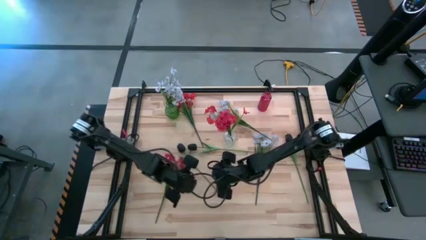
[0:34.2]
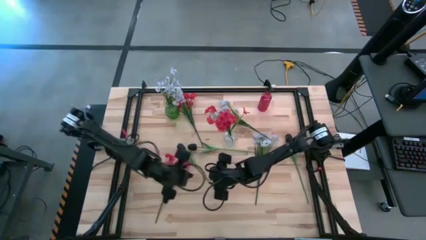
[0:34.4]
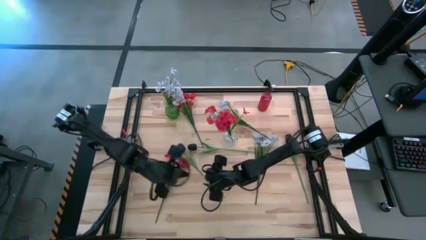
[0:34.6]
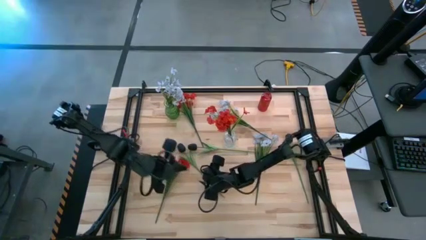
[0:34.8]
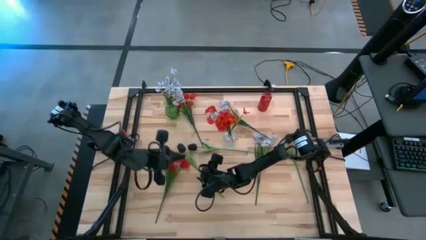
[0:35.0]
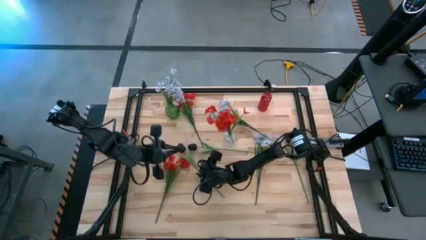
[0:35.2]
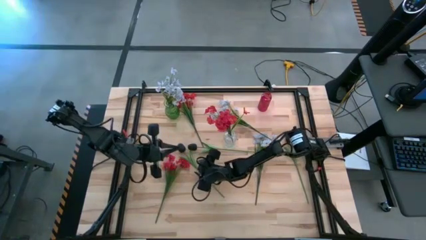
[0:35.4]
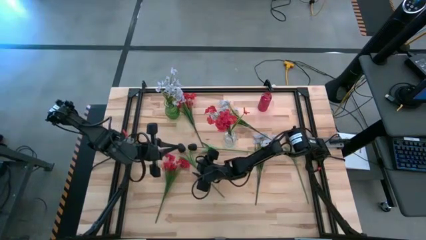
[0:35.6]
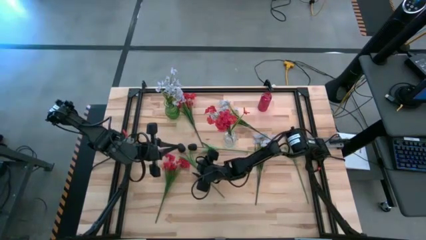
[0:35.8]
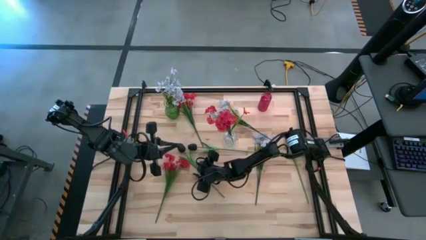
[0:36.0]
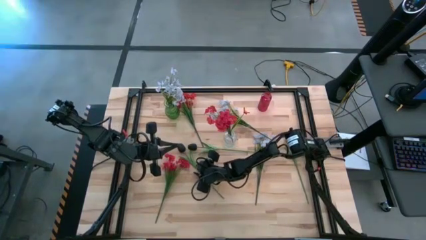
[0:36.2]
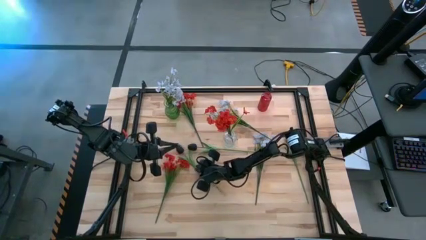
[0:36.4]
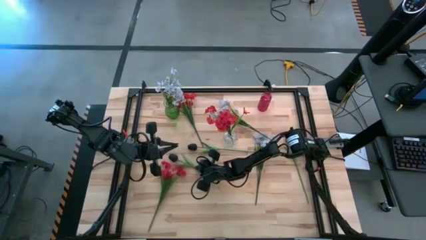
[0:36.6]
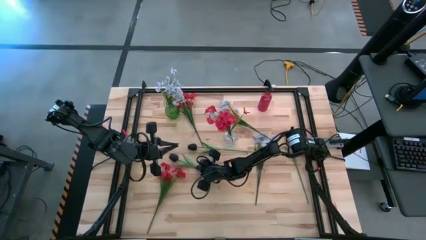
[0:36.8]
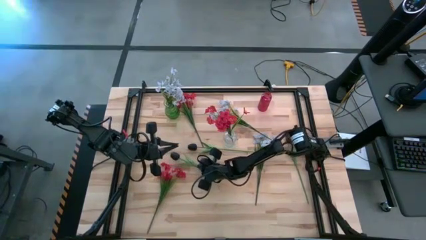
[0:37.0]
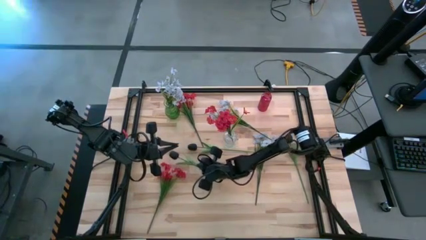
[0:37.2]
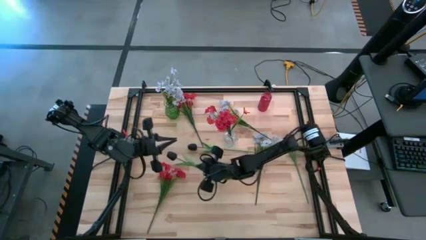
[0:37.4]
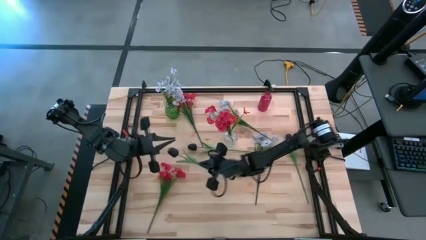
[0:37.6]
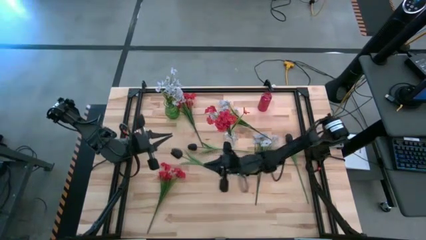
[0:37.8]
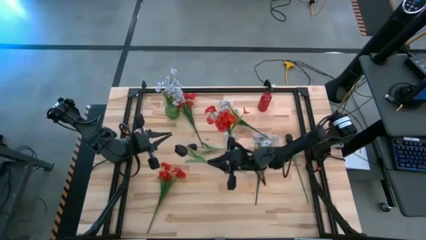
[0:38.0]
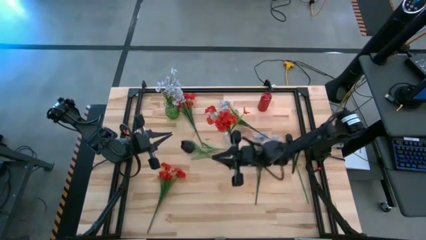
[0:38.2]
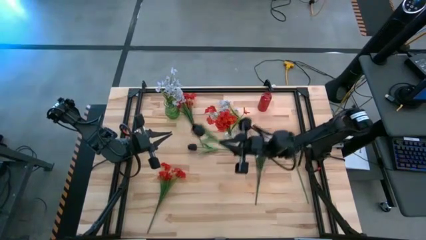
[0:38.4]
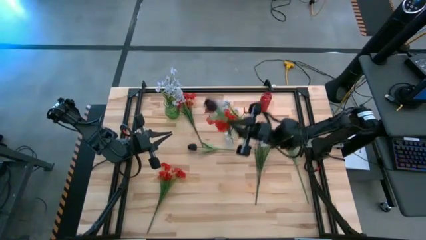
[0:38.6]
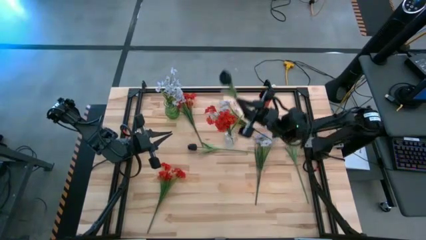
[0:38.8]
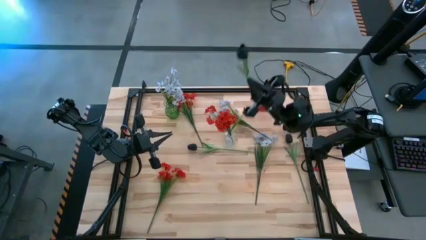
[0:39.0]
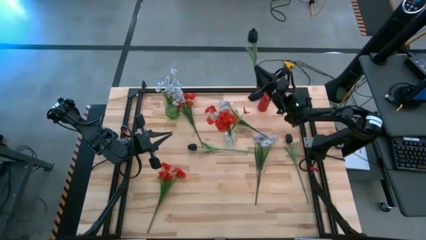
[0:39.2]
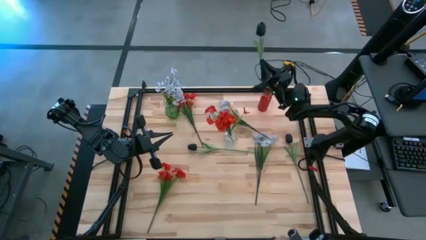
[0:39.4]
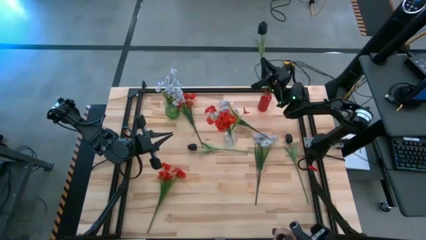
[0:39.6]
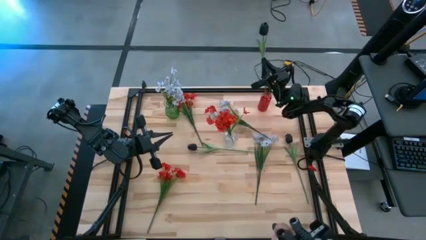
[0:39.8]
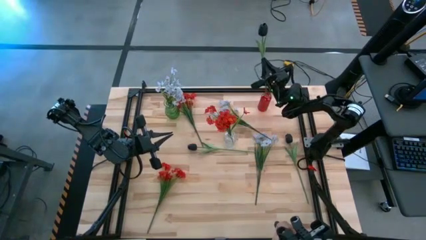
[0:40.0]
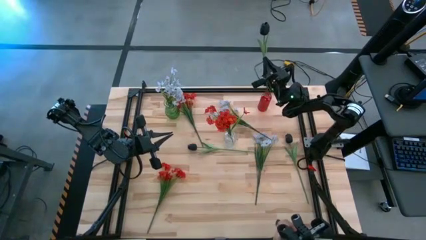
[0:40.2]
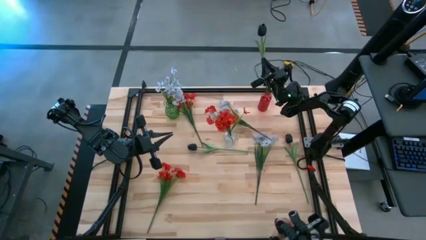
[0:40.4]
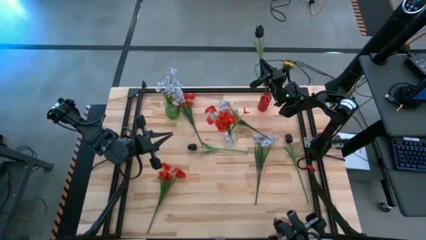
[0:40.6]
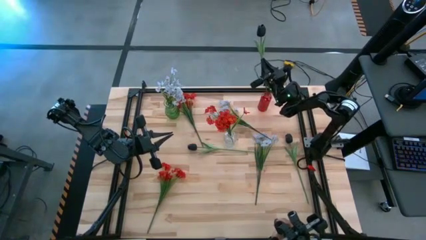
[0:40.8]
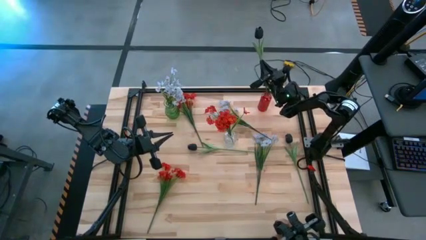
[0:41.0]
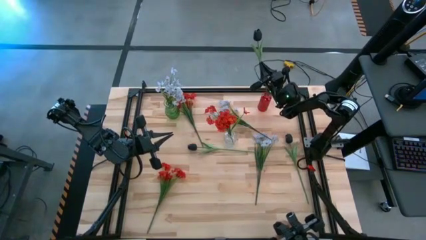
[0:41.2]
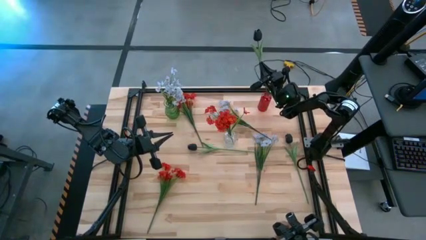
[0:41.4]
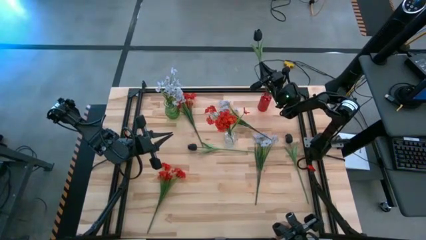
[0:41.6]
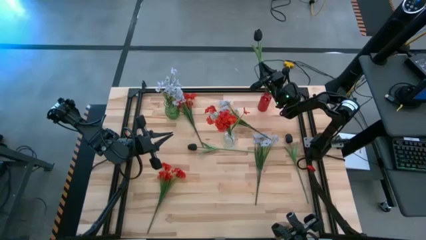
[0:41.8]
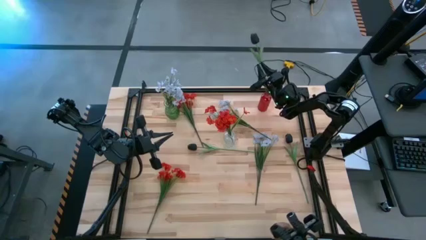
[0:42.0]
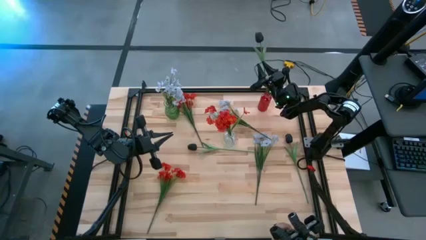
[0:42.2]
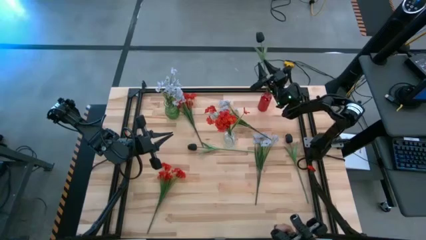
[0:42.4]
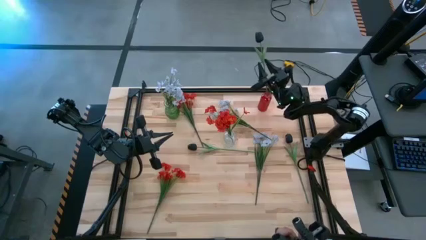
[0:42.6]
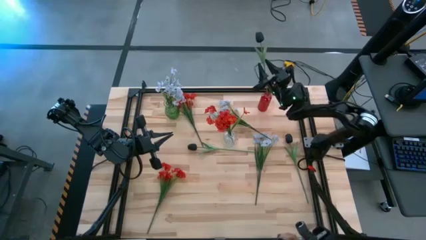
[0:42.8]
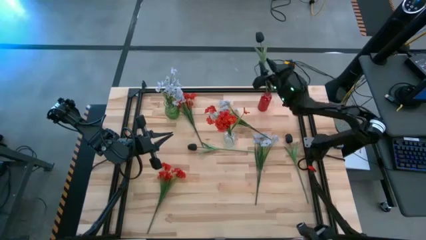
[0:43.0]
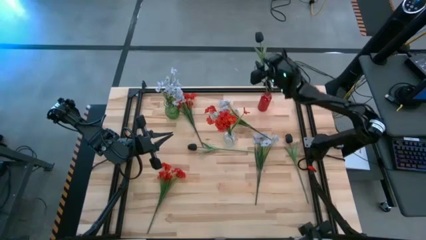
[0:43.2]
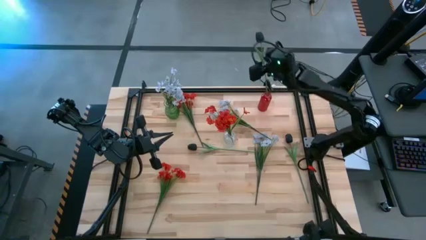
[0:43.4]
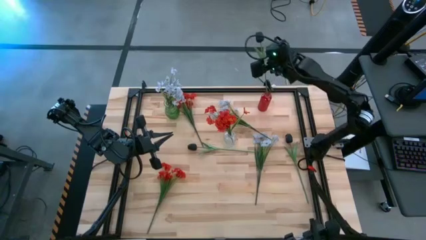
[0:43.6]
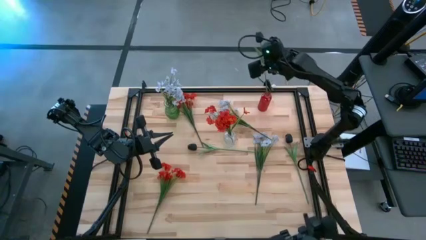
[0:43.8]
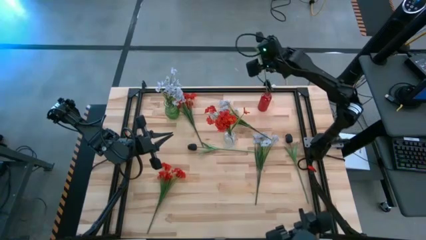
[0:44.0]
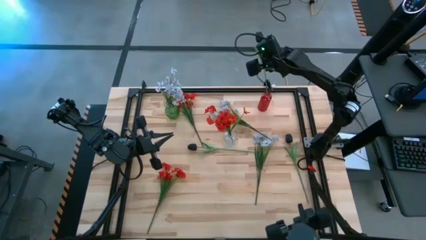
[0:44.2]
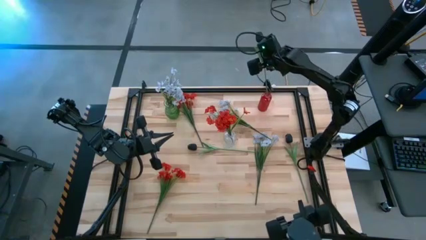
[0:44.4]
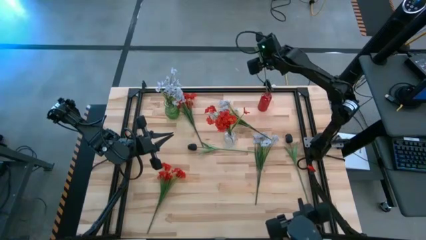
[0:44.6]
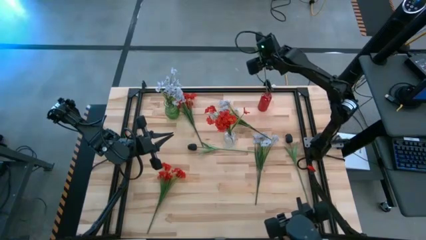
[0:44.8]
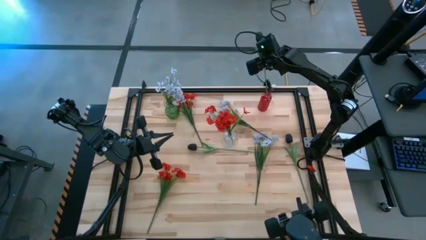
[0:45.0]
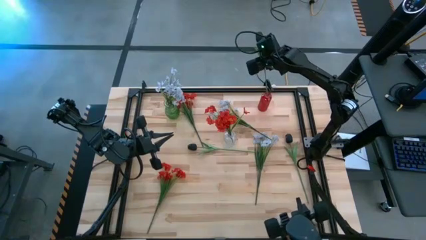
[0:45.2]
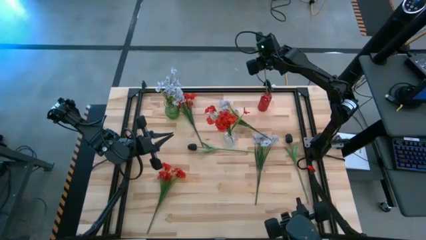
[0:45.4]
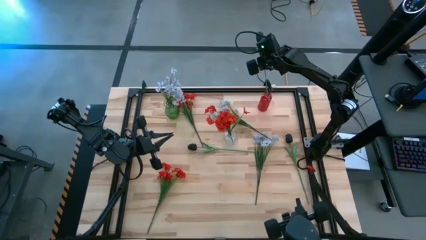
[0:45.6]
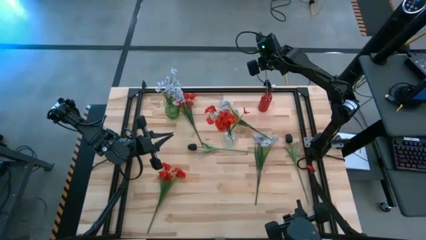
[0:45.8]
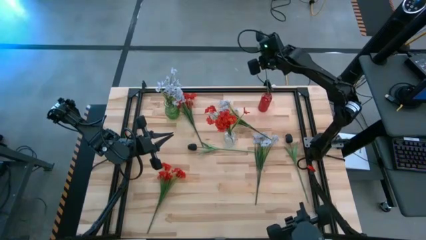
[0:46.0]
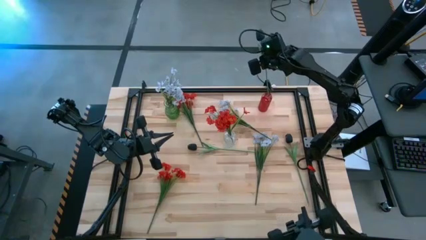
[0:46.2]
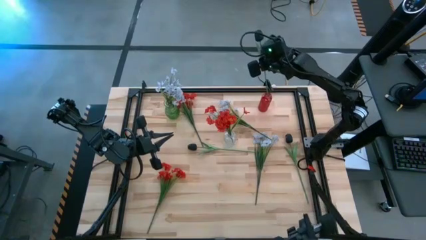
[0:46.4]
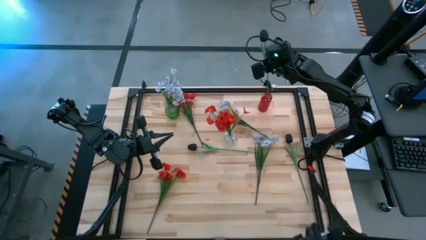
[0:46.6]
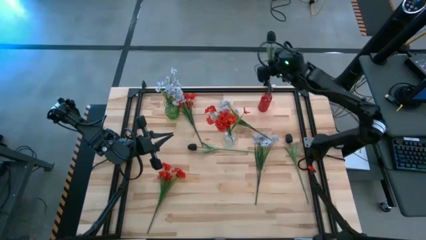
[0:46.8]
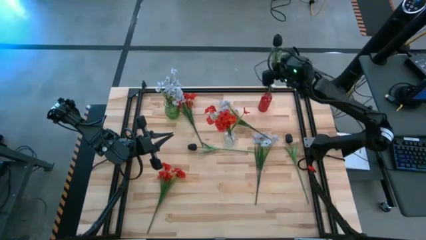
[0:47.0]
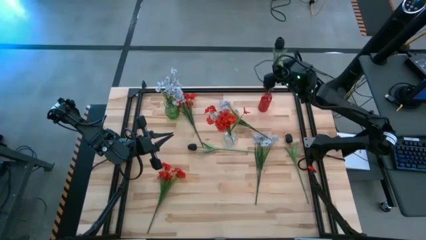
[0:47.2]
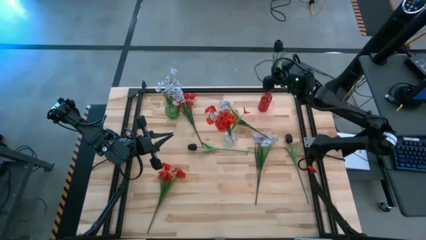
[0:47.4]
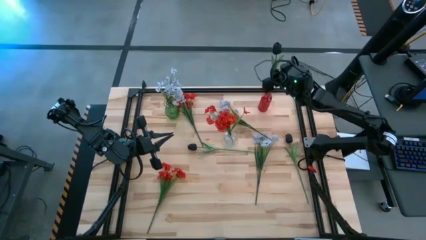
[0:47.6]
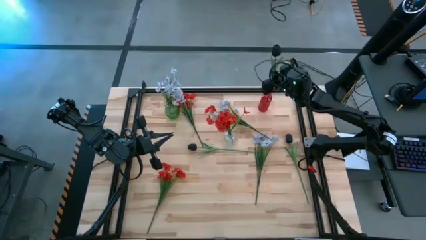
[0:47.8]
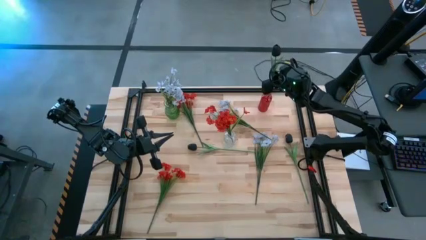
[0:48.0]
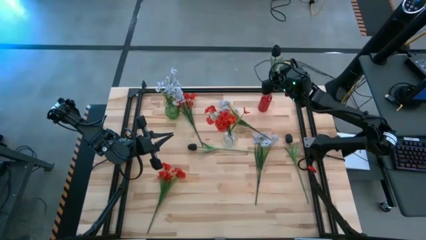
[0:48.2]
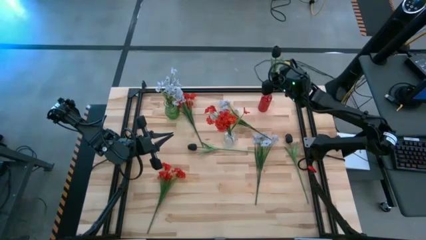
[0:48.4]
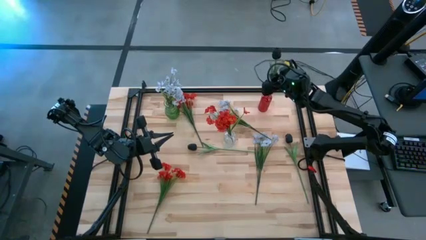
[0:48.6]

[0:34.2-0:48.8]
Task: Sort flowers into vase by color
Put the left black flower into the red vase
